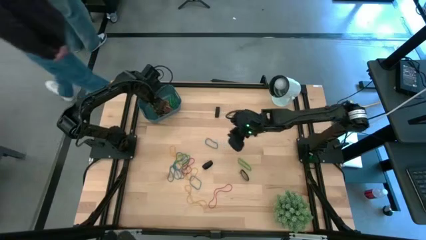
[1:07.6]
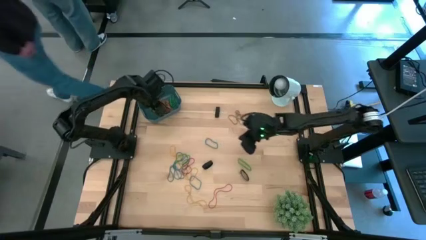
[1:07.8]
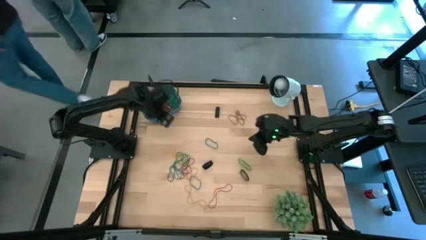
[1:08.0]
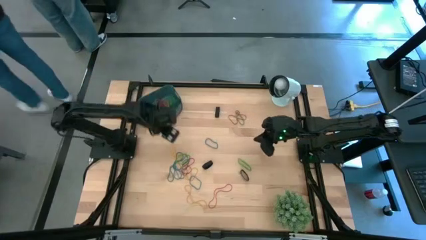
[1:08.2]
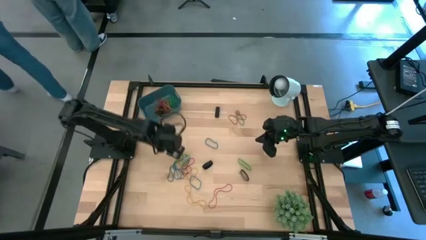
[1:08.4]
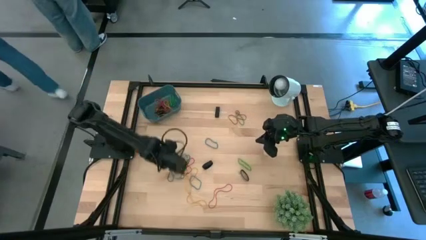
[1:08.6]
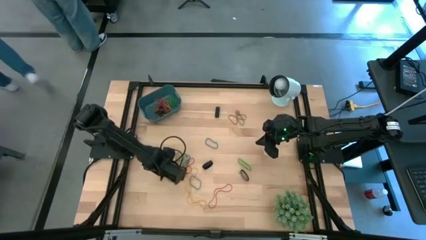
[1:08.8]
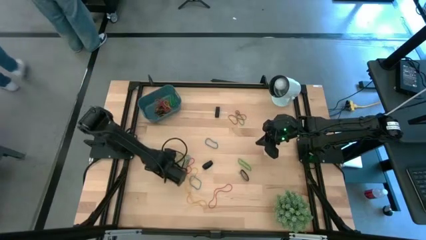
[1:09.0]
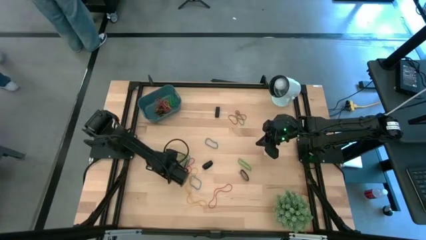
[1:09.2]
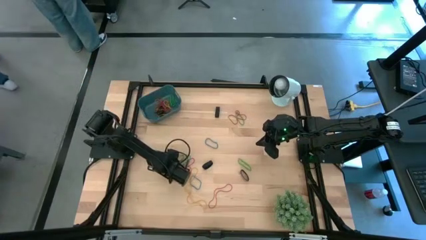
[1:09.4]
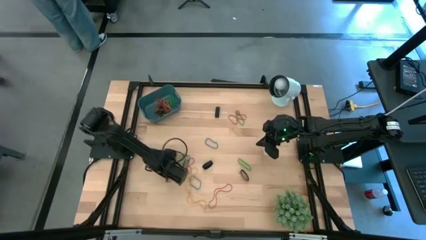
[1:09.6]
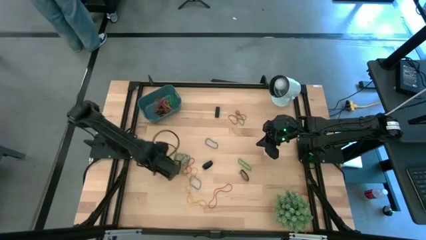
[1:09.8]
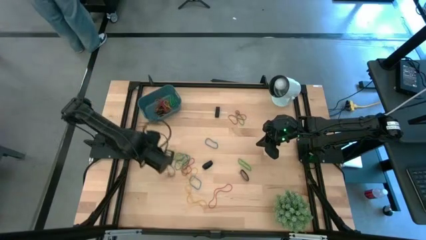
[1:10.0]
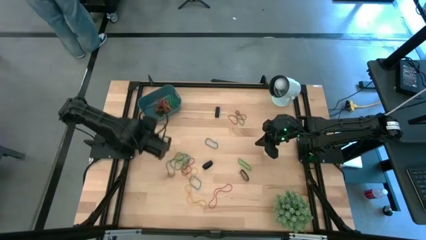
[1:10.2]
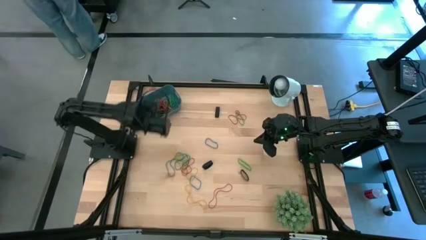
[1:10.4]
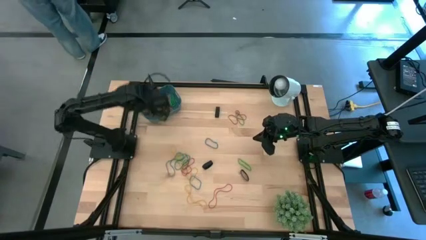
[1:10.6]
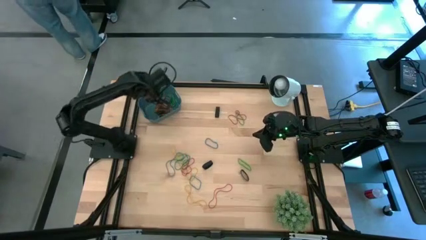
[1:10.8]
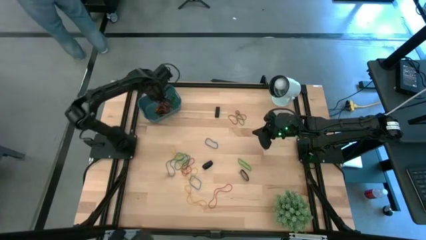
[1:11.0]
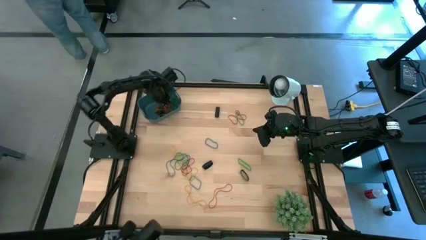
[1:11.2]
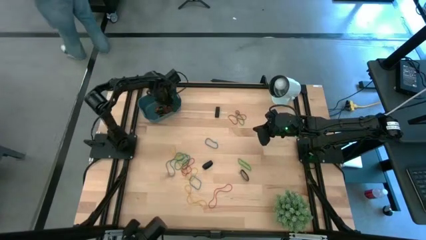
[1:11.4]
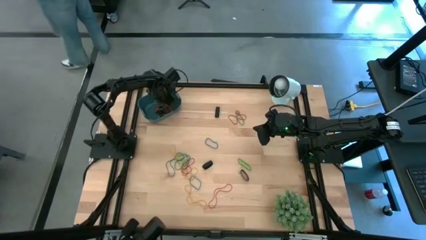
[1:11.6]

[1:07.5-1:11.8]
Task: Pick and place rubber bands into bin
Put the blue rubber band into the bin

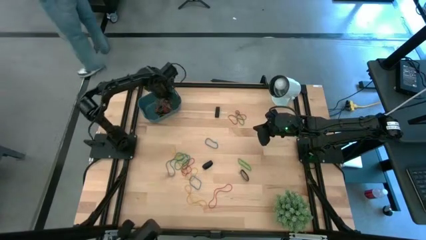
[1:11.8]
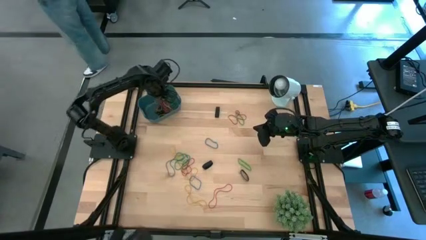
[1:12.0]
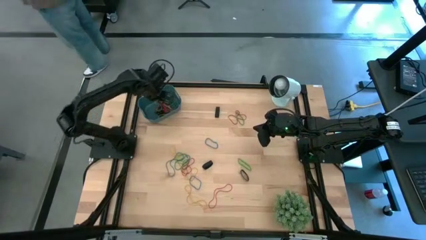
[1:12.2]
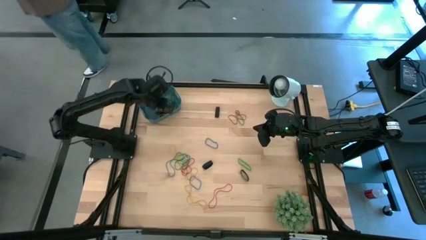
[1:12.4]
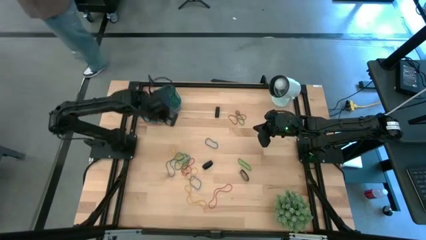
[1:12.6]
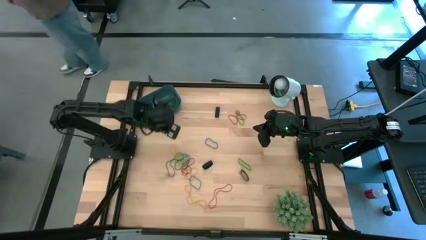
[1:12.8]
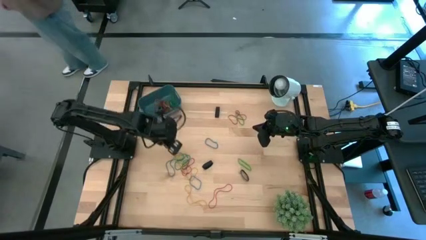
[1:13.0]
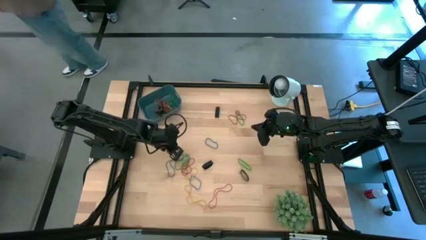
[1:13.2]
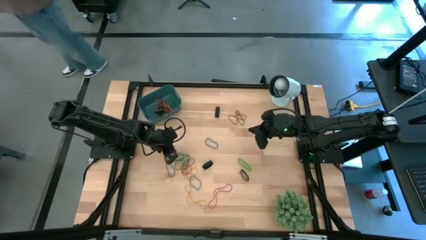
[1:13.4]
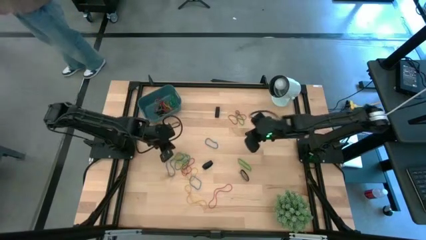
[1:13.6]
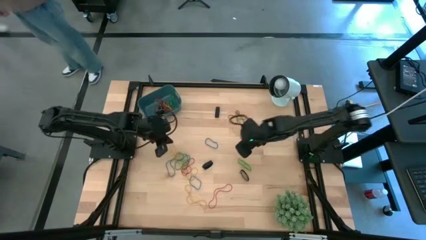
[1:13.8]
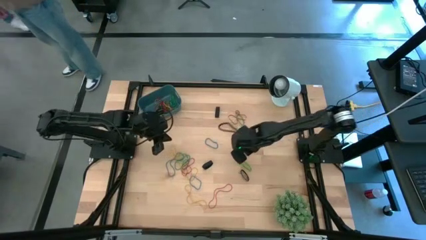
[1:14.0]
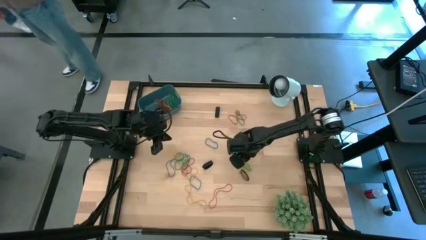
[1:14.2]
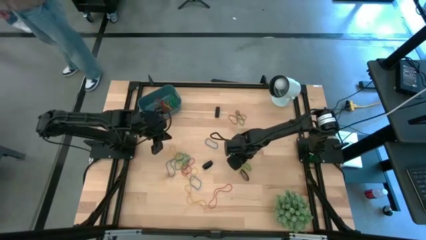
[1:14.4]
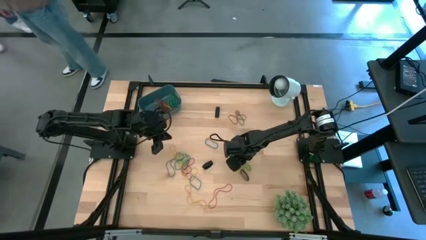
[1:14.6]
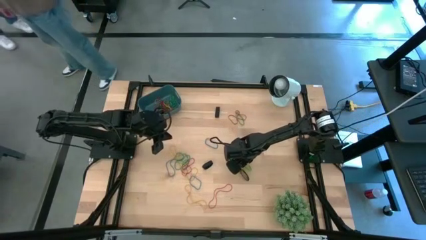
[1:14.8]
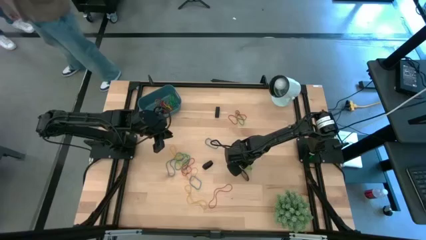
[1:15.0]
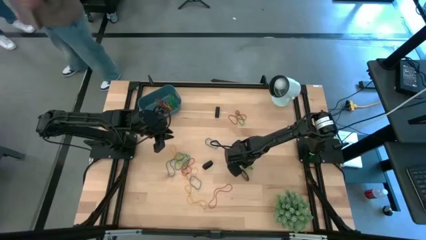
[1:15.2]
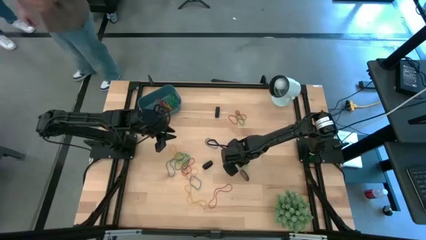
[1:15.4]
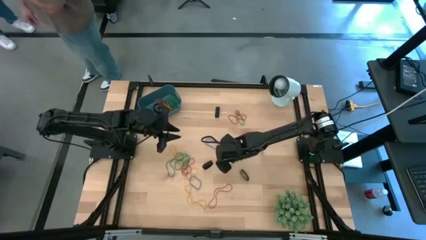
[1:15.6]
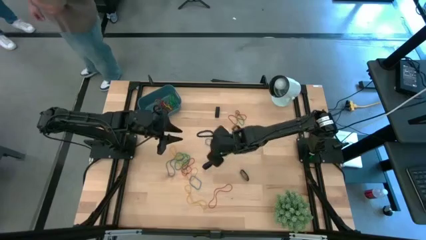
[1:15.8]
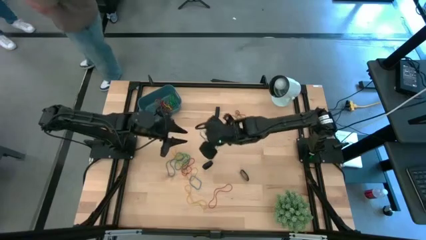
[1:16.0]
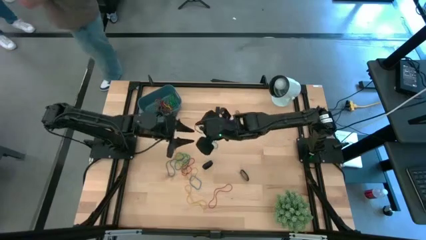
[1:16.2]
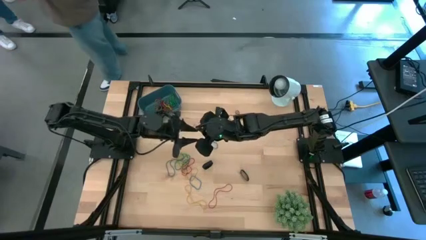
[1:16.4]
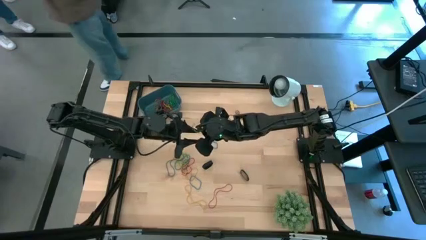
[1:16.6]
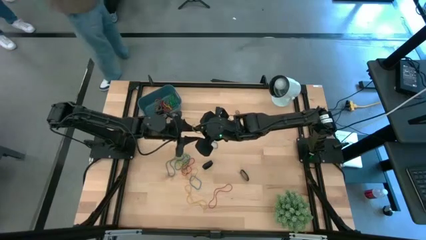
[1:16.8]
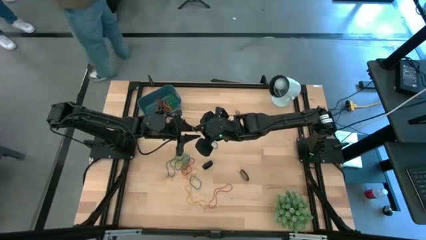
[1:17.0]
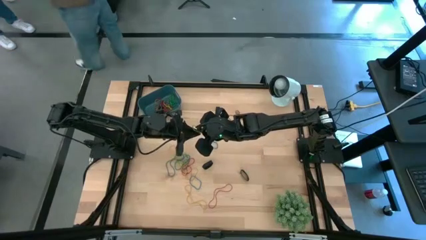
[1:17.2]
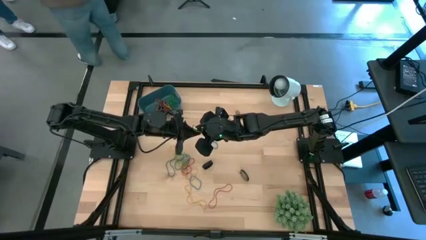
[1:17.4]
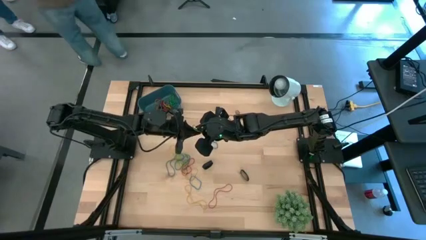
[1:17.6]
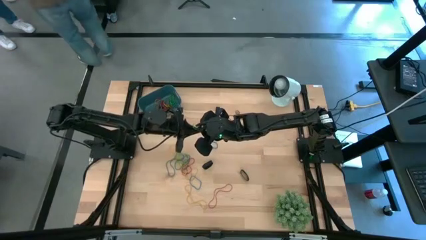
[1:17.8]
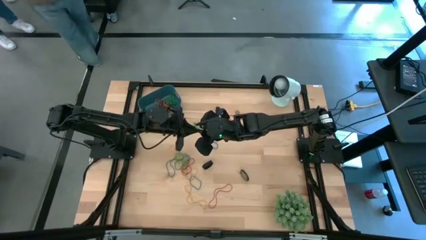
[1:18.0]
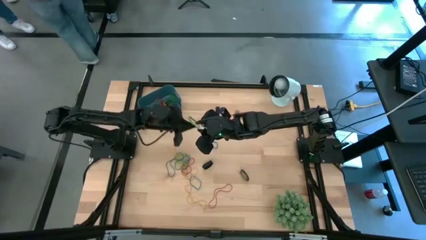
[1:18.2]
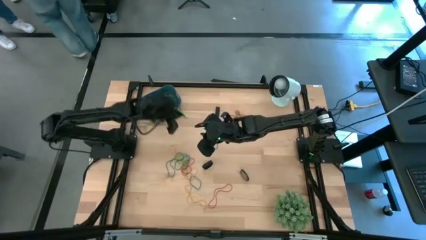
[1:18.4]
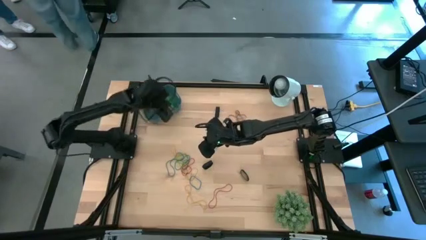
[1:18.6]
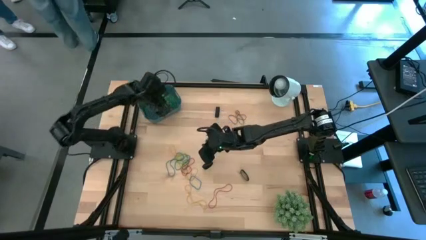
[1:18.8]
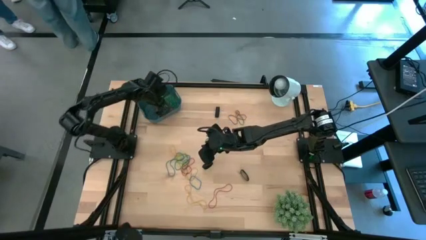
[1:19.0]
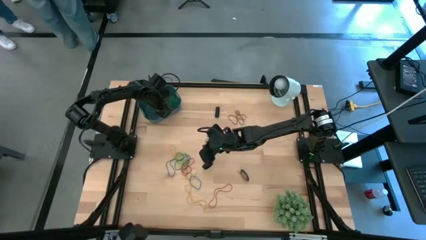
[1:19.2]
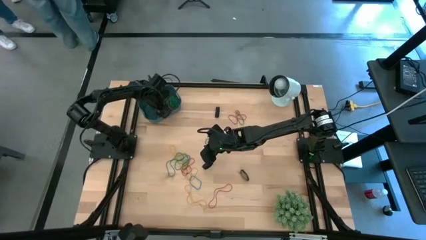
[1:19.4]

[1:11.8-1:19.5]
Put the bottom right green rubber band into the bin

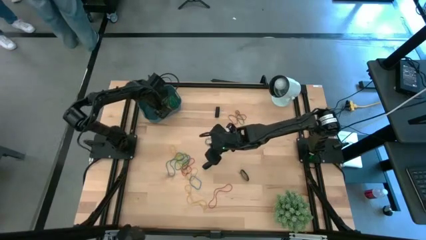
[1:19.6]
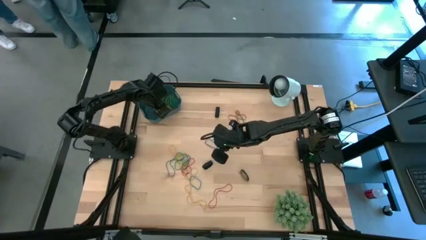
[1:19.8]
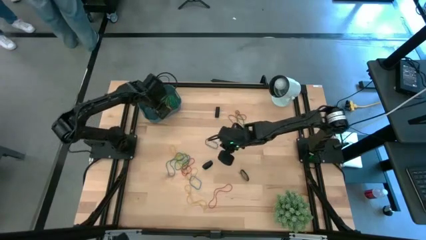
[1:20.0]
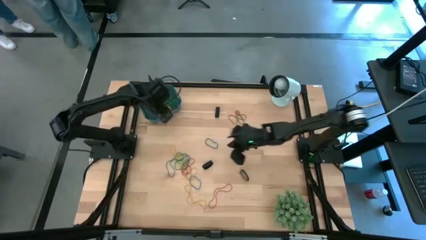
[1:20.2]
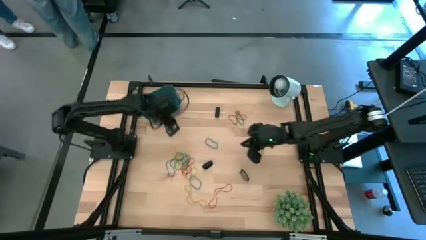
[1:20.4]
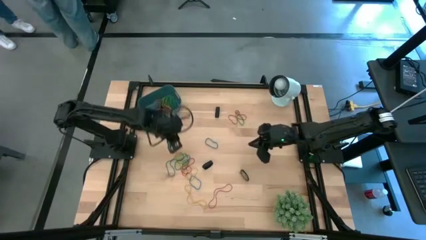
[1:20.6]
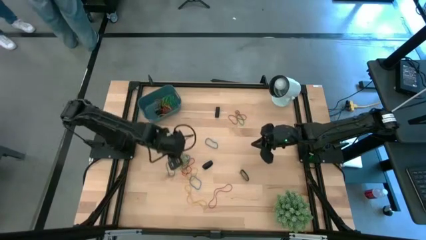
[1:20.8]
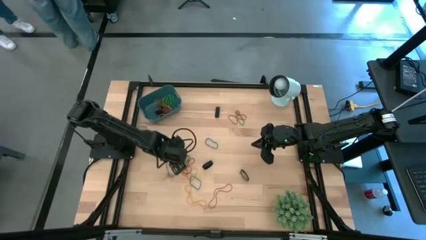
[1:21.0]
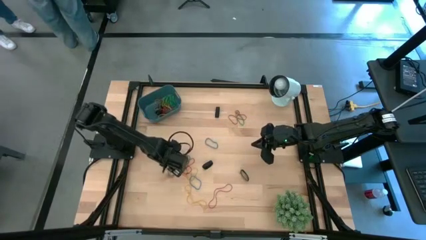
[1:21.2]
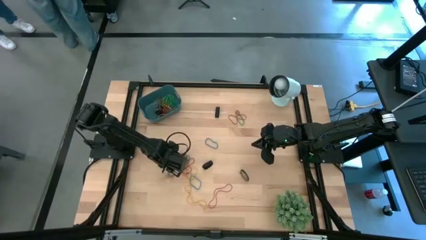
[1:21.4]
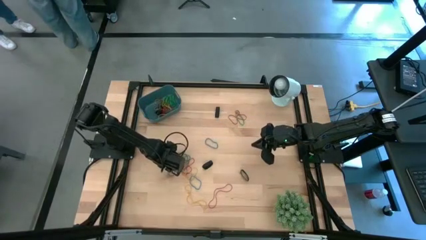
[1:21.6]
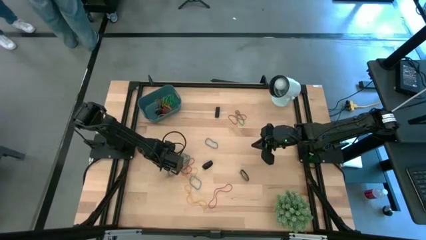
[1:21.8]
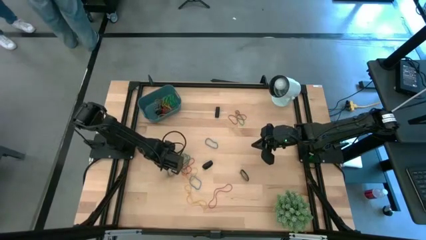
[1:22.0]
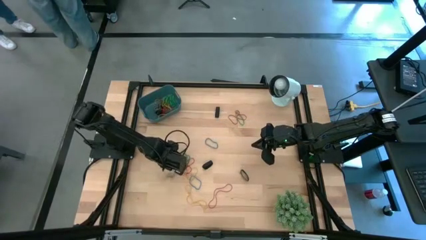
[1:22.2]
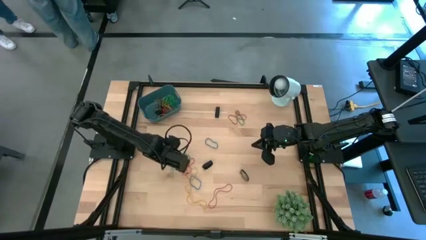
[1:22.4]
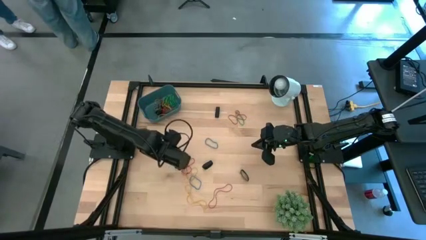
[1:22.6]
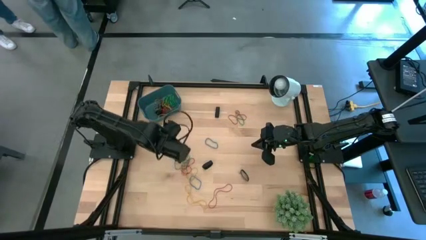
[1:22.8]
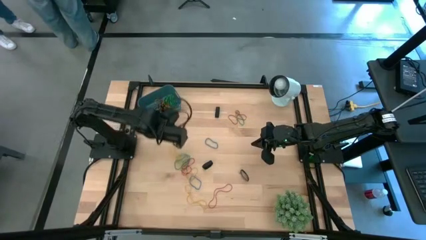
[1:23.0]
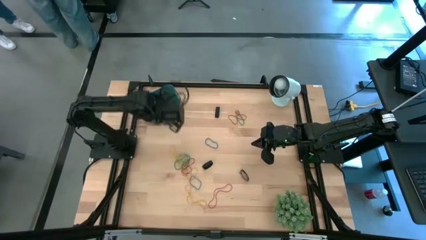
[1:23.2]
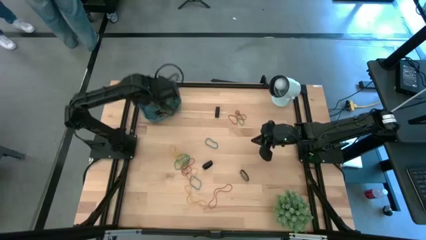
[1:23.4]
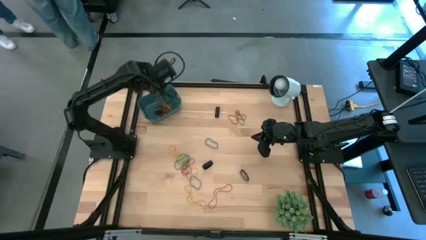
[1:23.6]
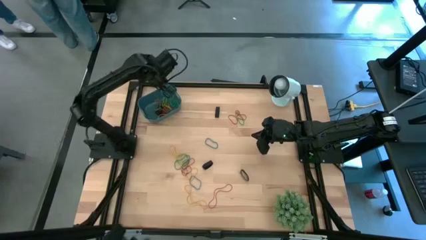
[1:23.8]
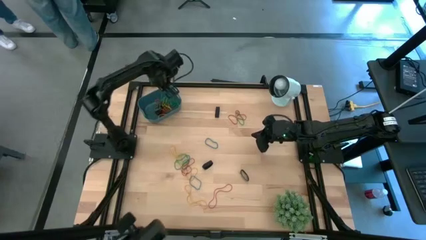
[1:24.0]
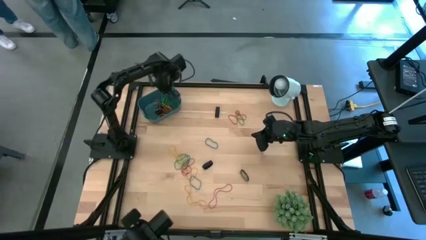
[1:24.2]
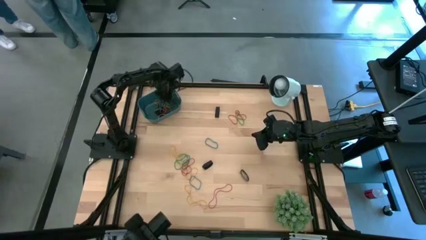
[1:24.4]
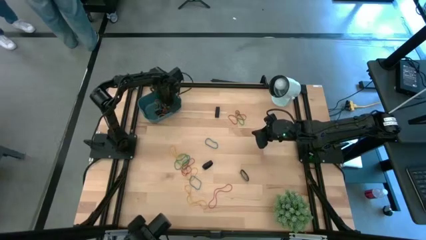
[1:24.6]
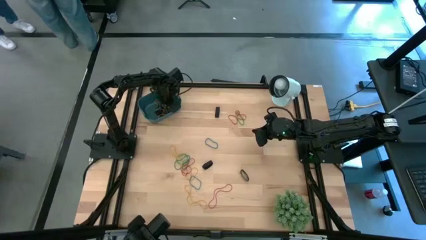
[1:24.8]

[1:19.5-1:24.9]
Put the blue rubber band into the bin
